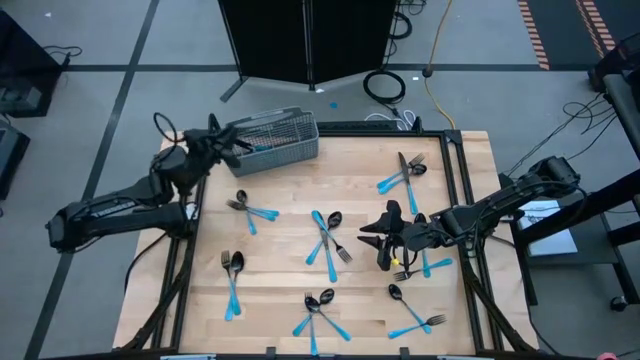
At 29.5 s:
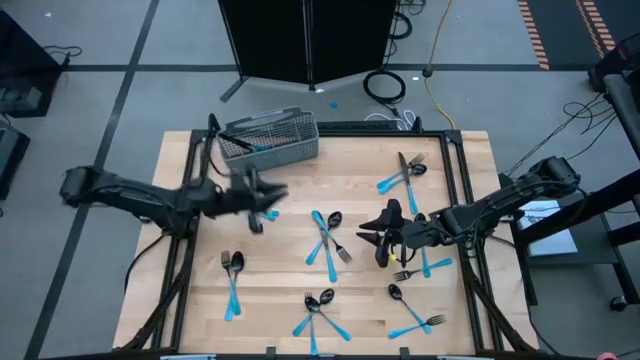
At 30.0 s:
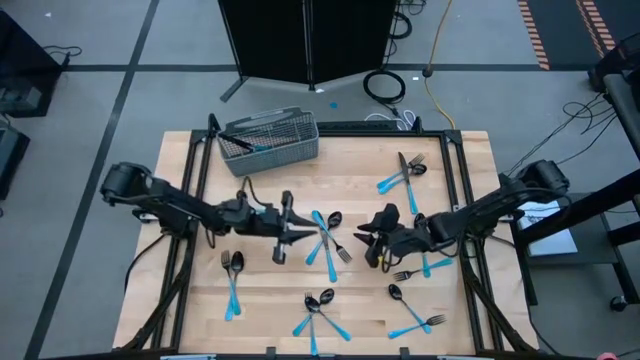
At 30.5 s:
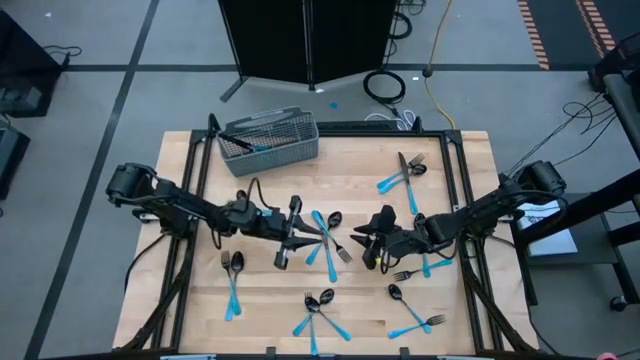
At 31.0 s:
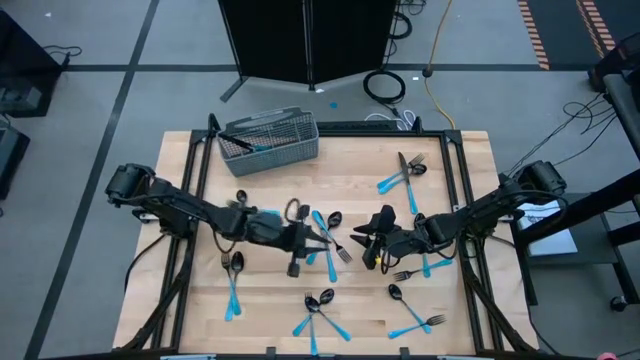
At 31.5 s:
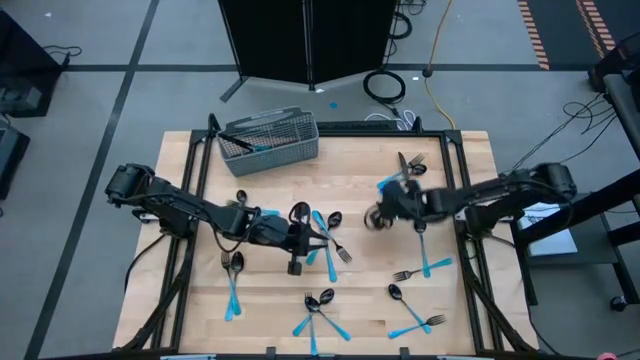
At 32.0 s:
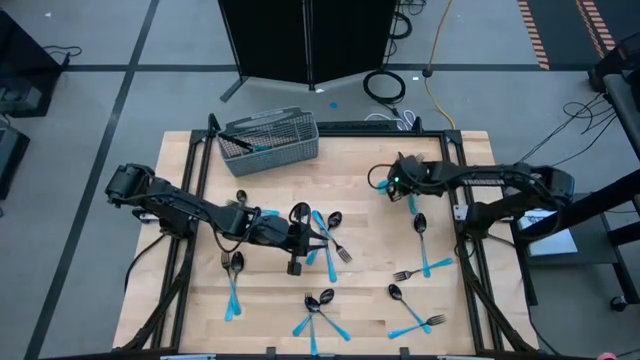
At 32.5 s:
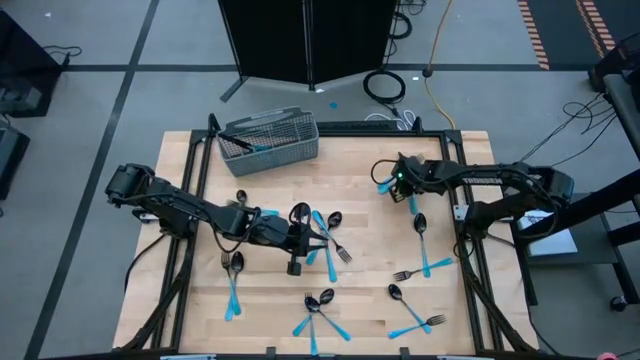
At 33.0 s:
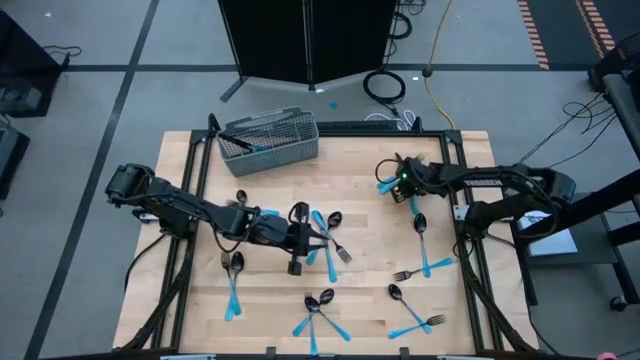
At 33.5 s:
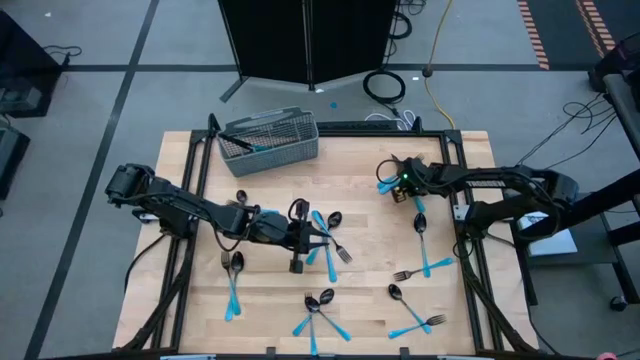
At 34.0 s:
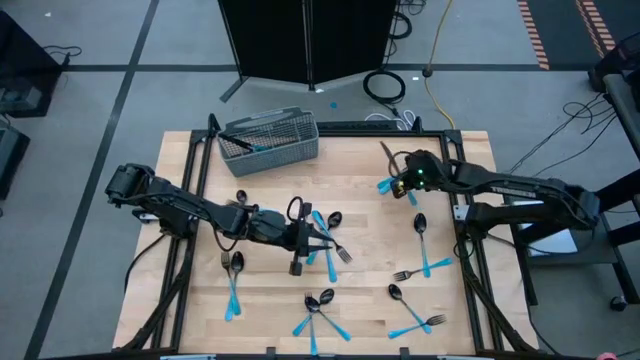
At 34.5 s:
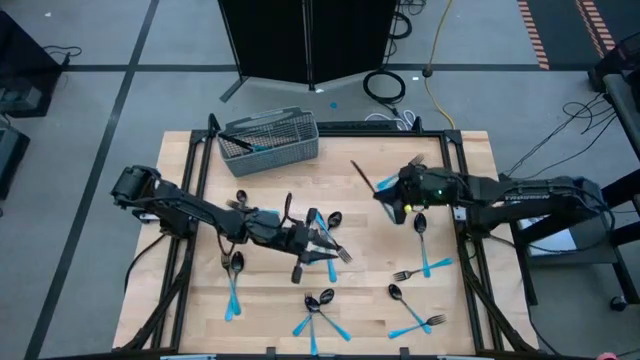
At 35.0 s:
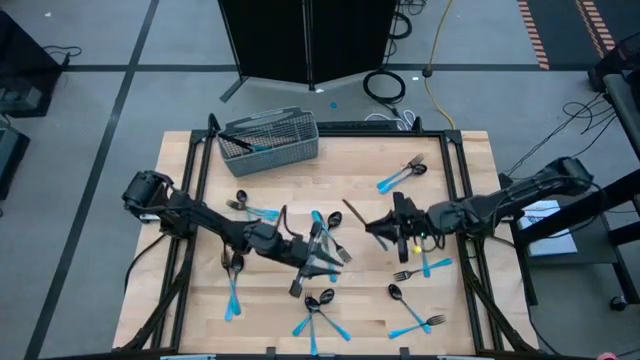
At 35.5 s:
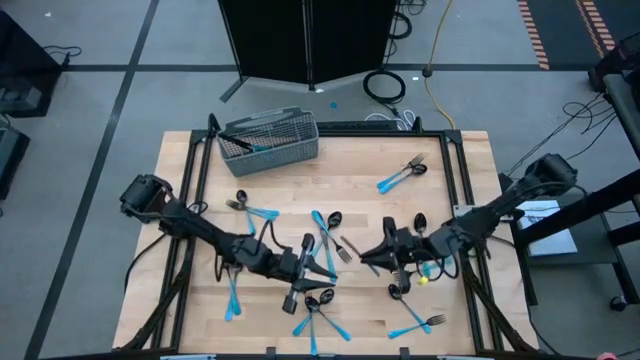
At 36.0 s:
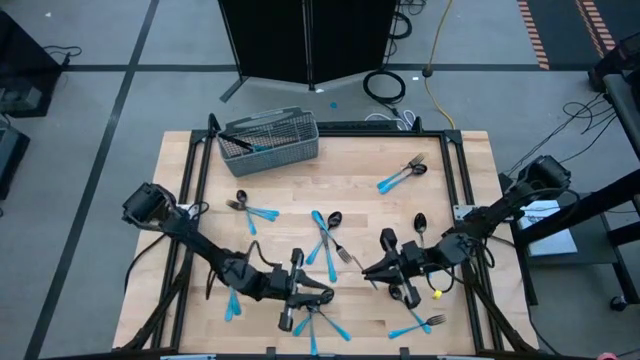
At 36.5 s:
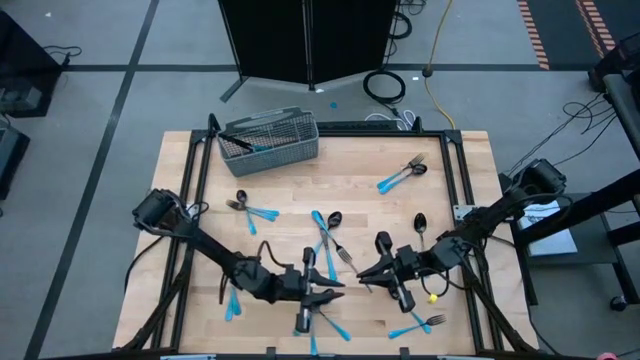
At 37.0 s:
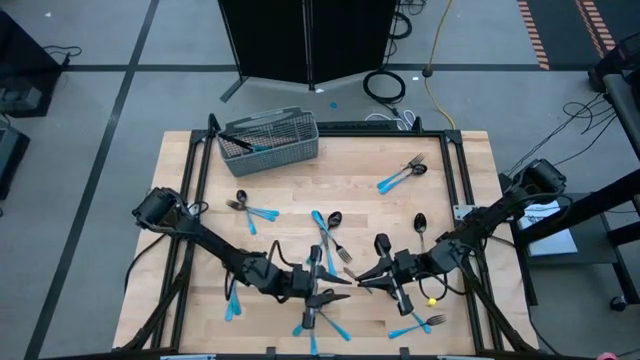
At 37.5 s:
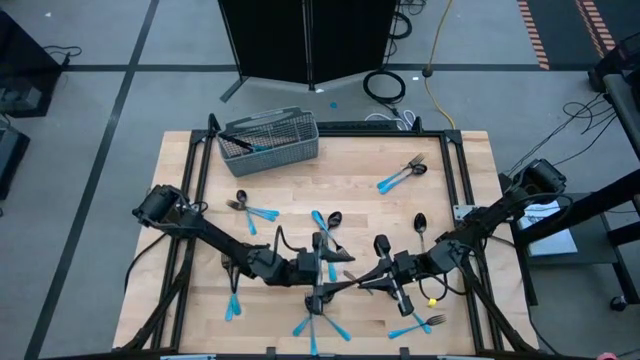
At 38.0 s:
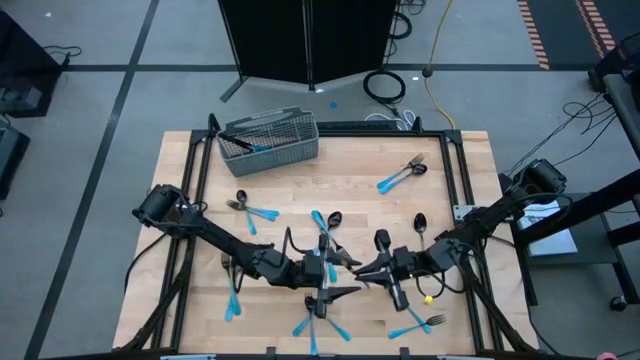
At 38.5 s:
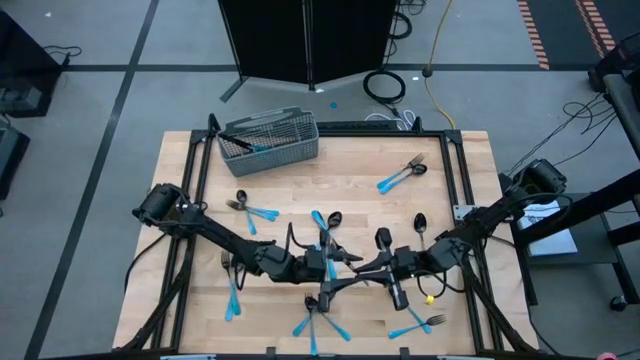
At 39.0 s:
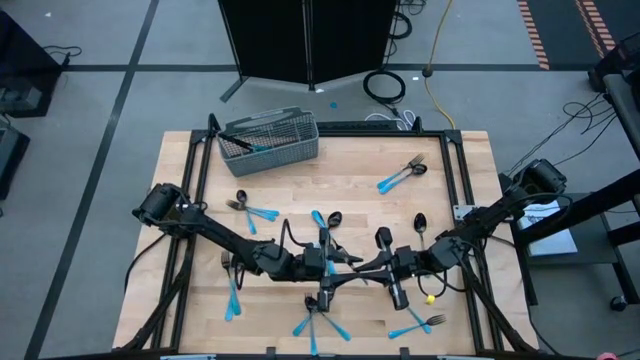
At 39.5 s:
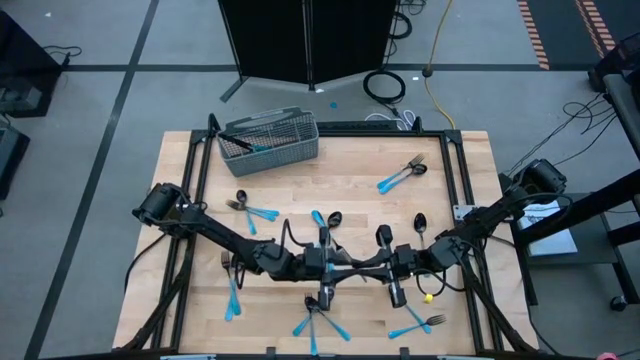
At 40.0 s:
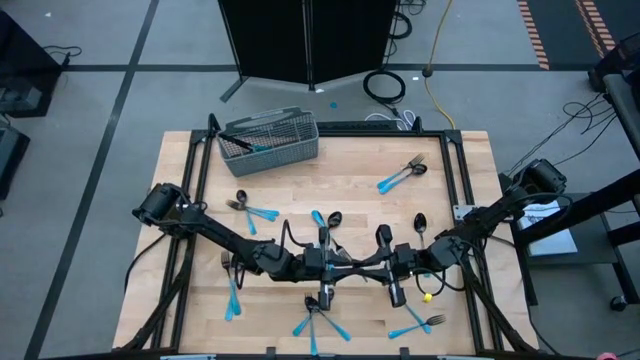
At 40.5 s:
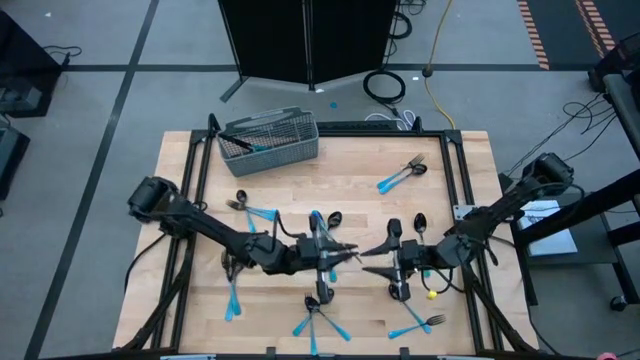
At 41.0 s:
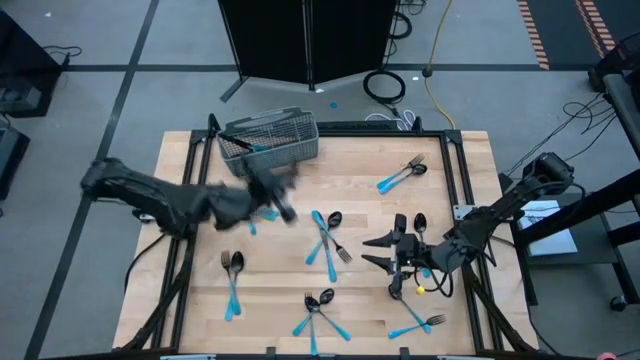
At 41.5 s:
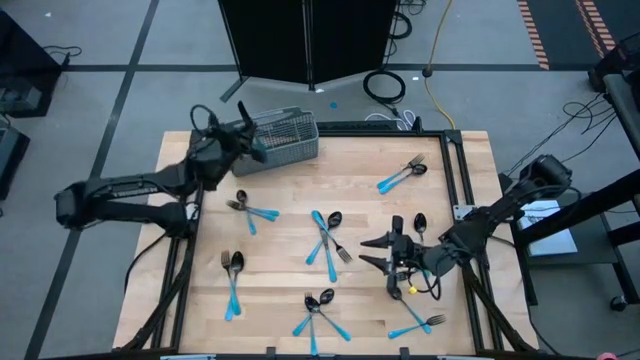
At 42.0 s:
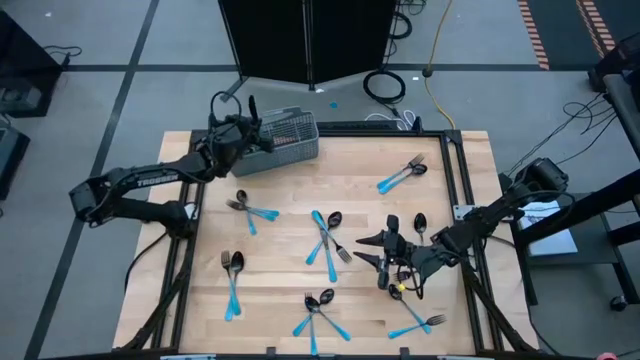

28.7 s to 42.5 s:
Task: Sort silverware
Put the blue knife into the silverware basket

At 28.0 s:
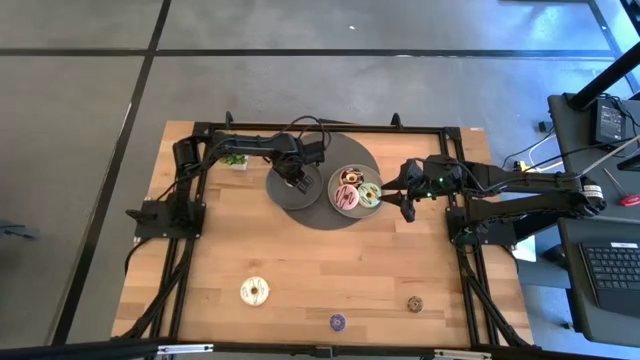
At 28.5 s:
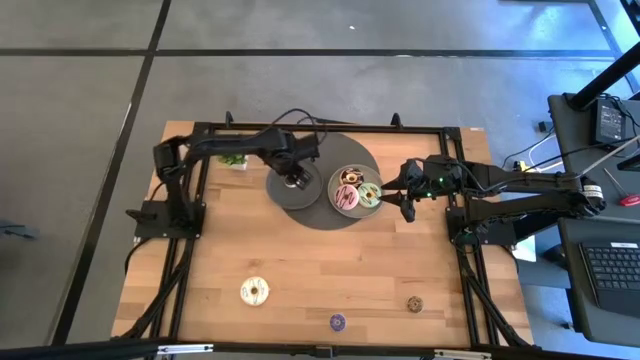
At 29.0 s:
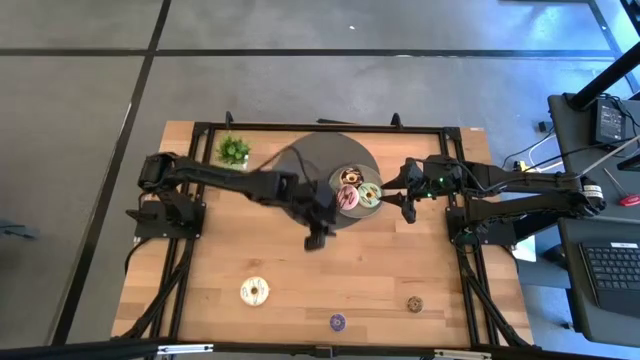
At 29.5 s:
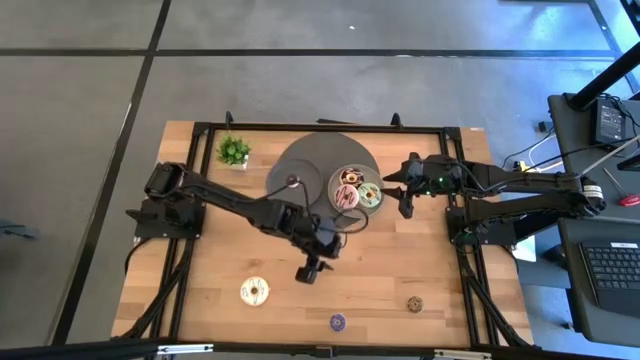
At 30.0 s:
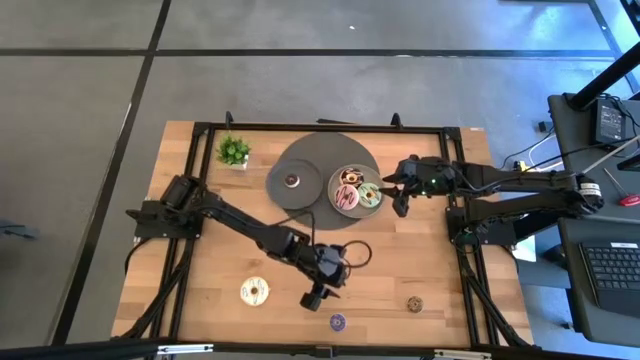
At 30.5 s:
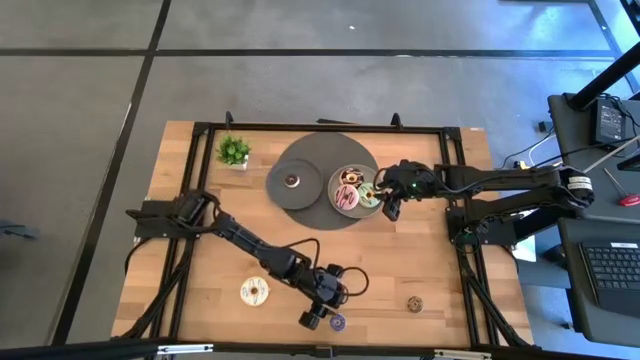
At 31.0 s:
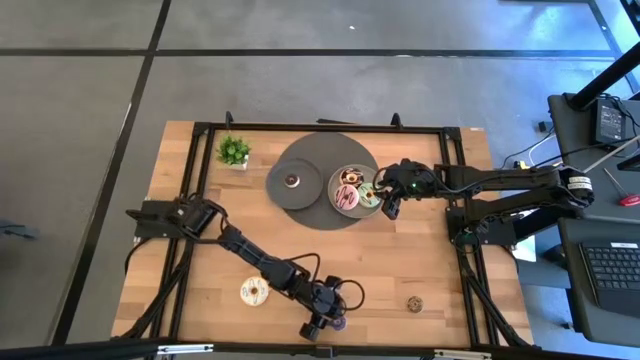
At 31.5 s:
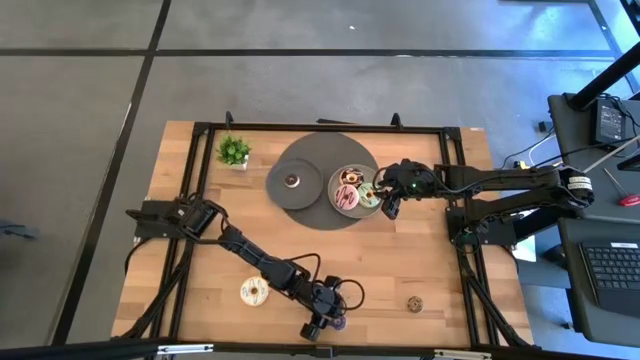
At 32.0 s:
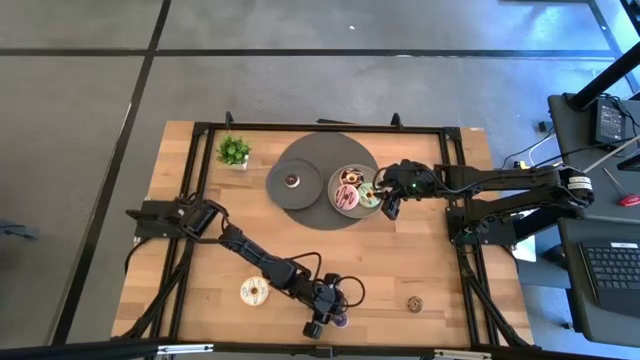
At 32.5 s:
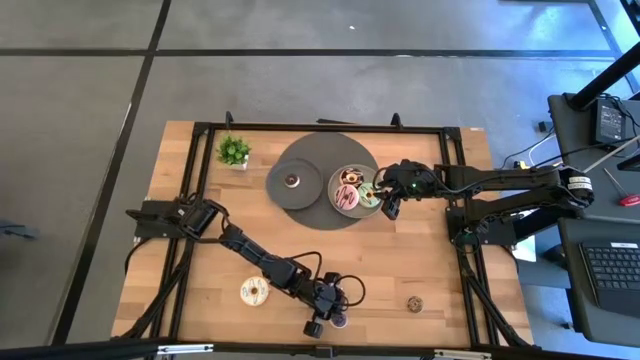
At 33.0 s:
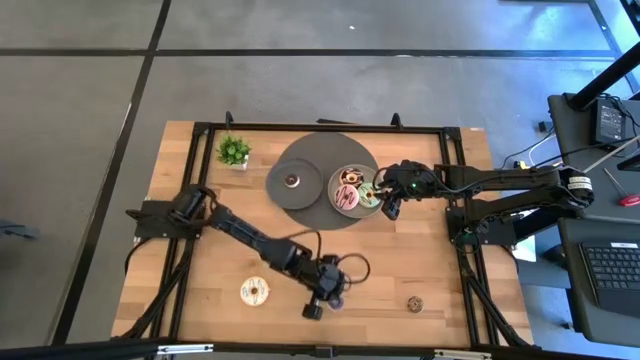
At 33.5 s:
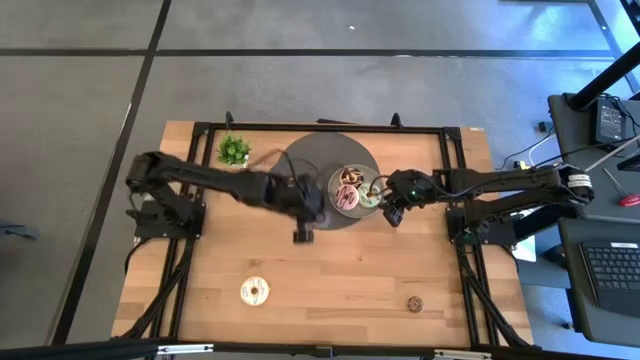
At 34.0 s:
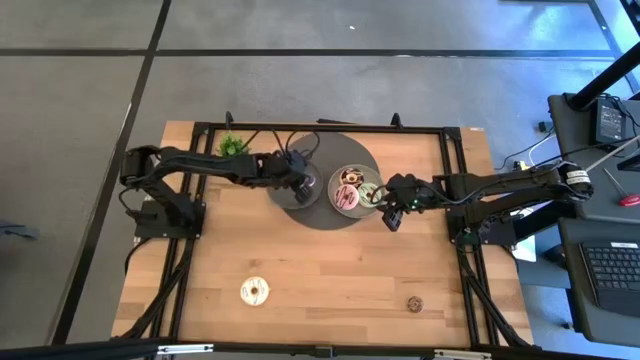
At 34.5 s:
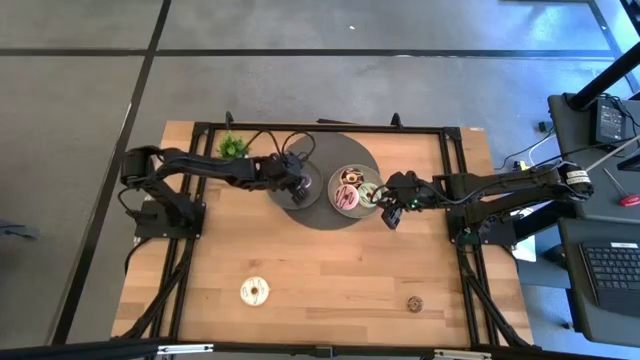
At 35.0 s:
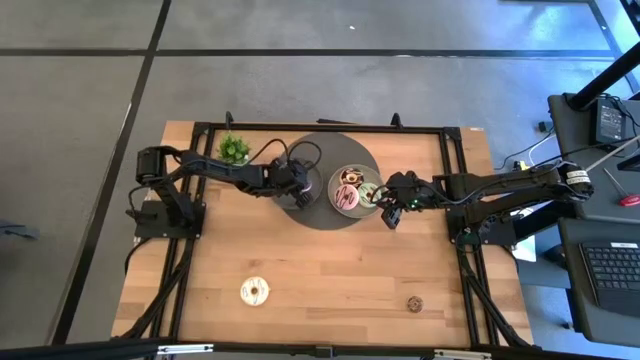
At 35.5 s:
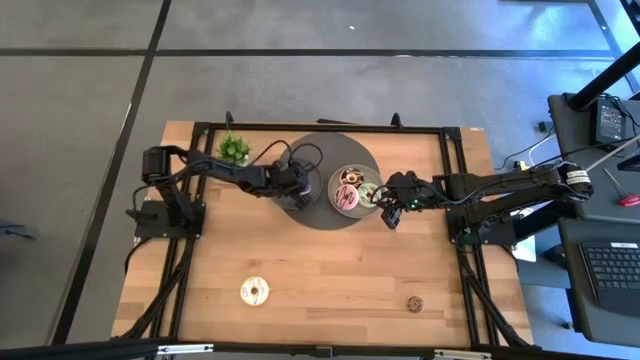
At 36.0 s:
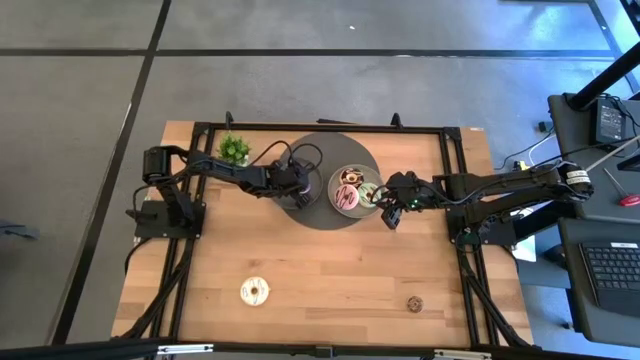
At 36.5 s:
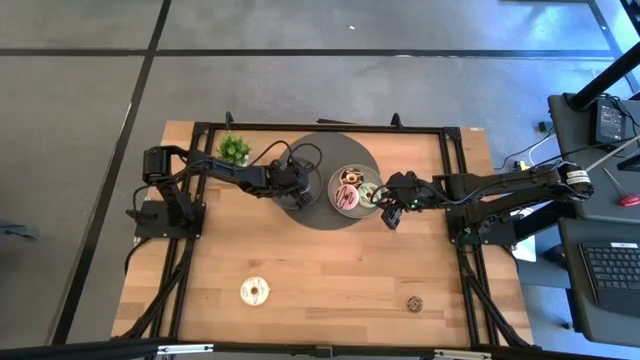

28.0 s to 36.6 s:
Task: Pick & Place donuts
Put the small blue donut on the dark gray plate
